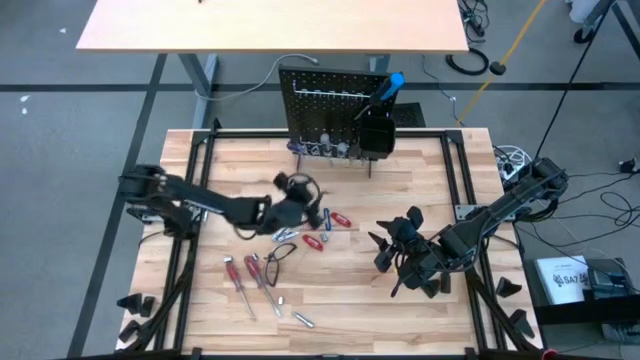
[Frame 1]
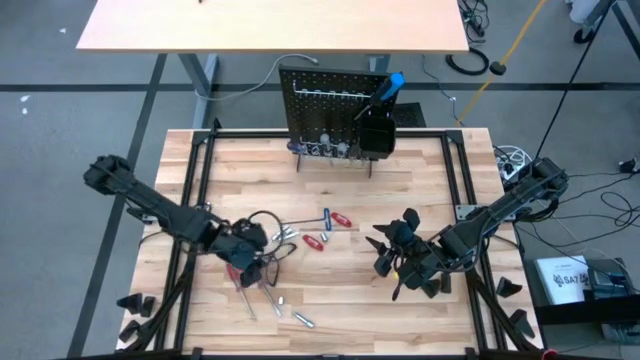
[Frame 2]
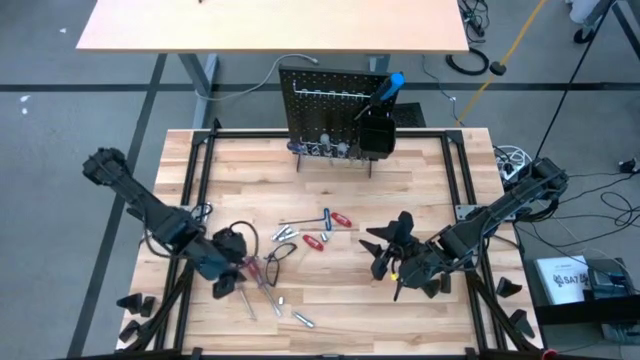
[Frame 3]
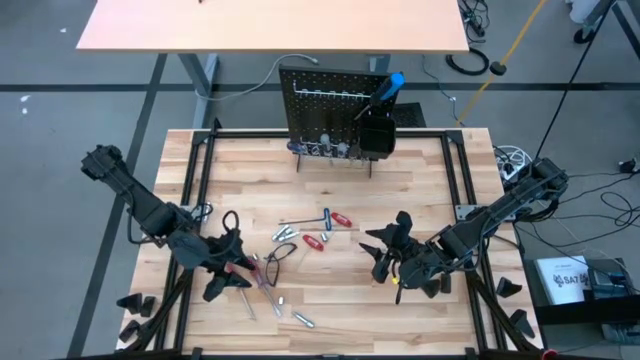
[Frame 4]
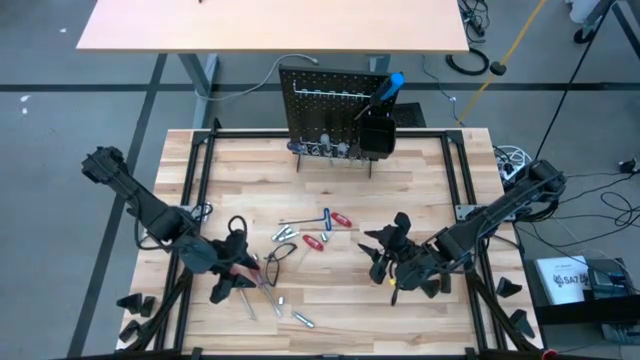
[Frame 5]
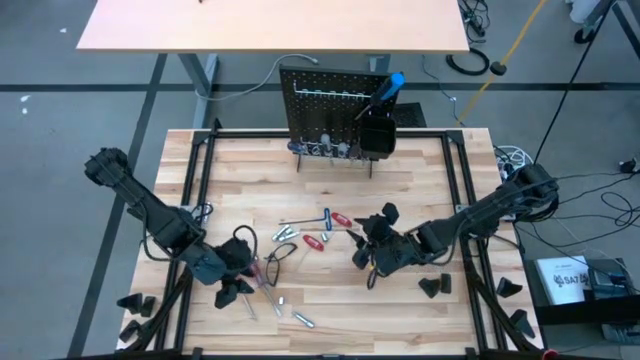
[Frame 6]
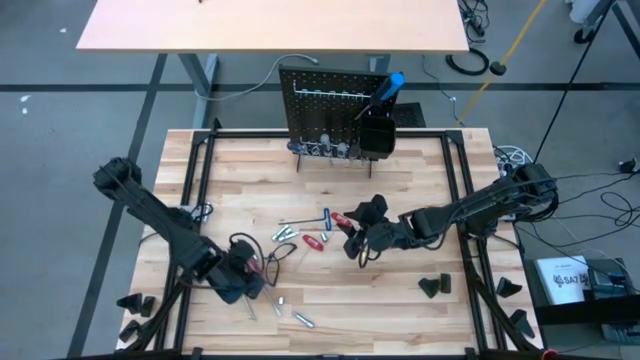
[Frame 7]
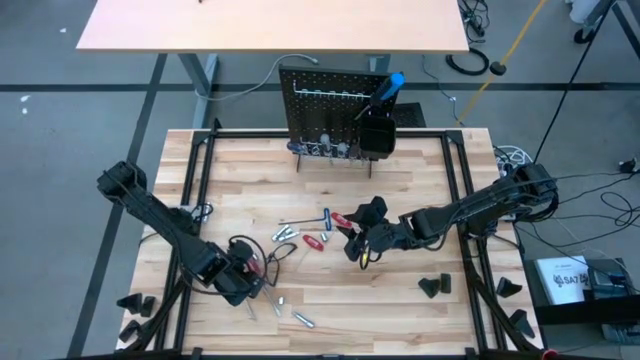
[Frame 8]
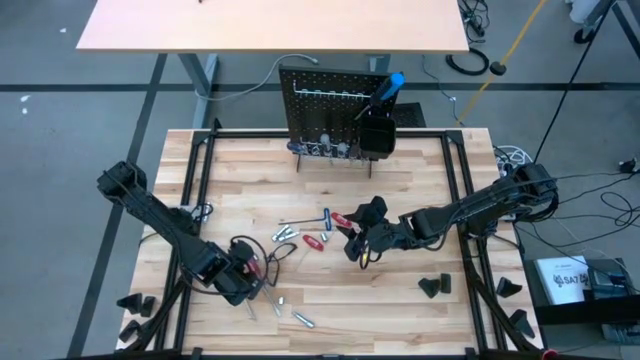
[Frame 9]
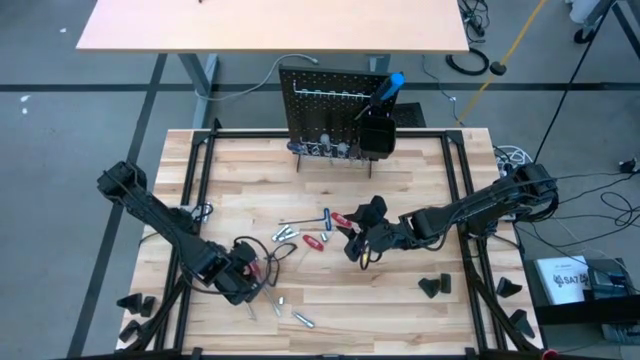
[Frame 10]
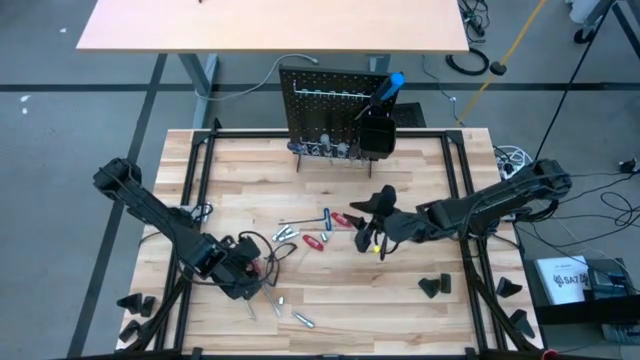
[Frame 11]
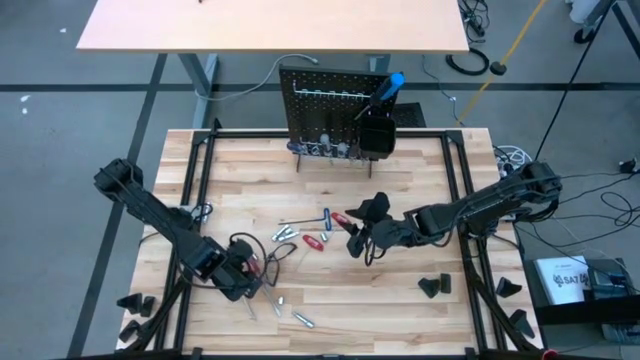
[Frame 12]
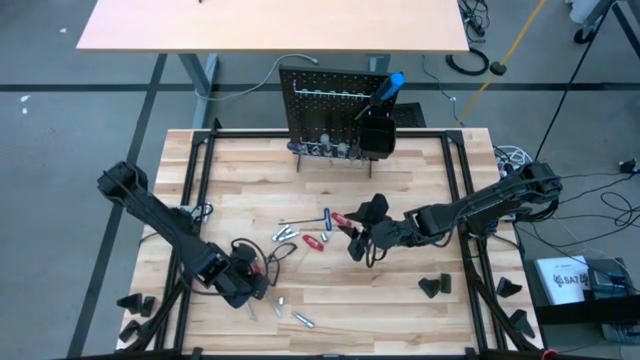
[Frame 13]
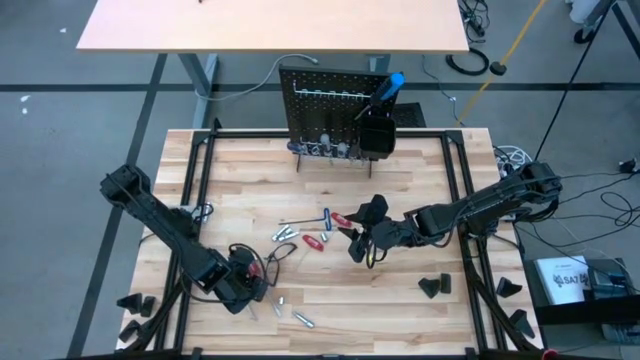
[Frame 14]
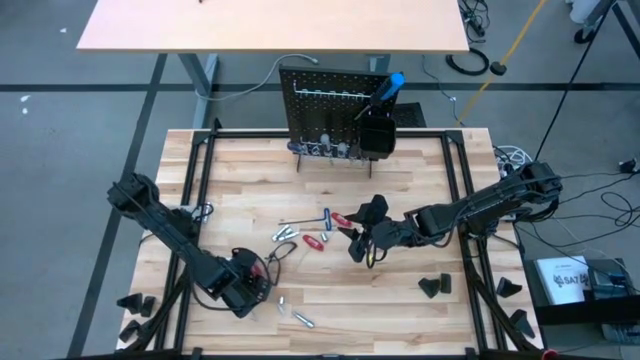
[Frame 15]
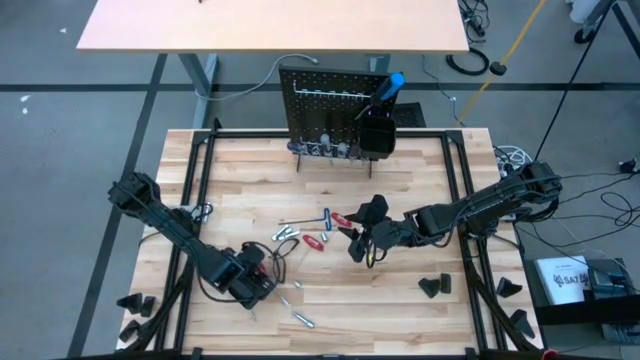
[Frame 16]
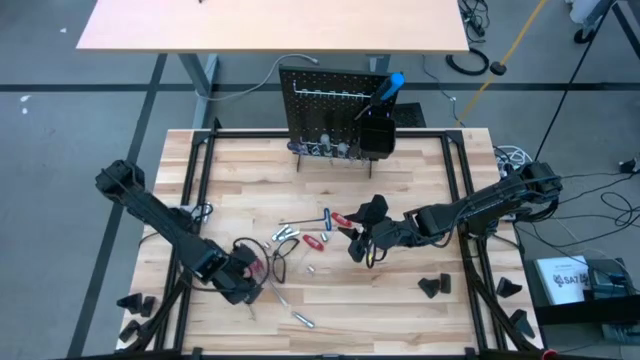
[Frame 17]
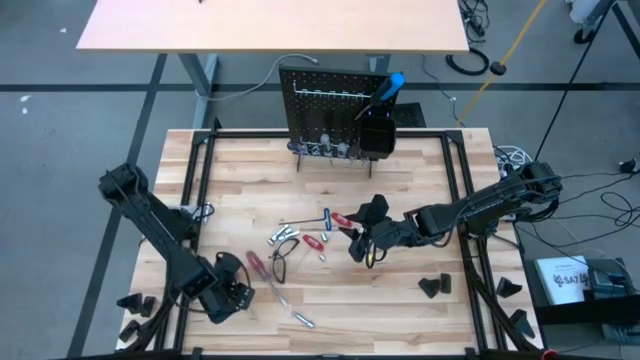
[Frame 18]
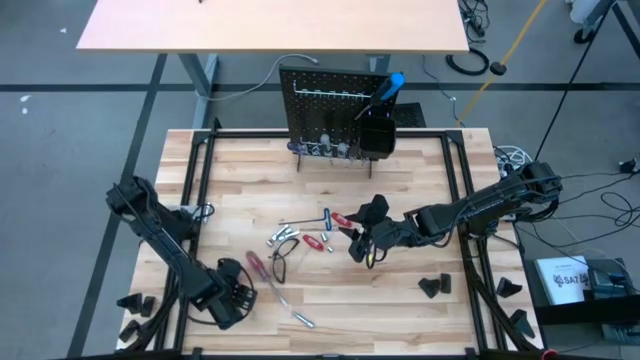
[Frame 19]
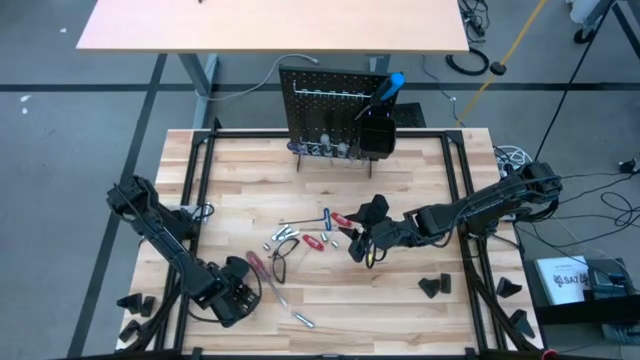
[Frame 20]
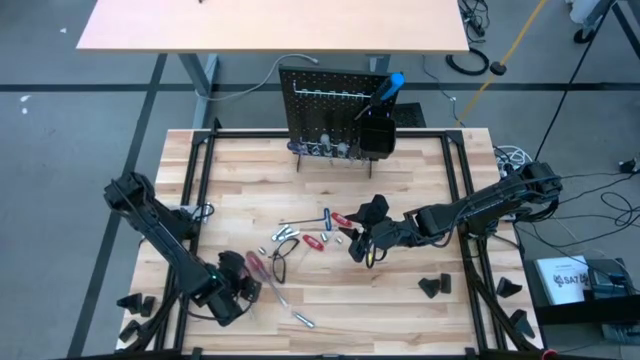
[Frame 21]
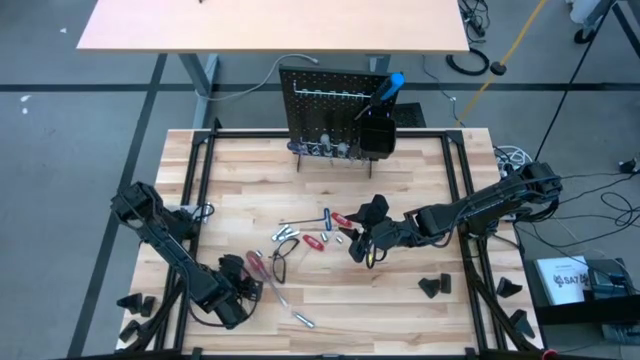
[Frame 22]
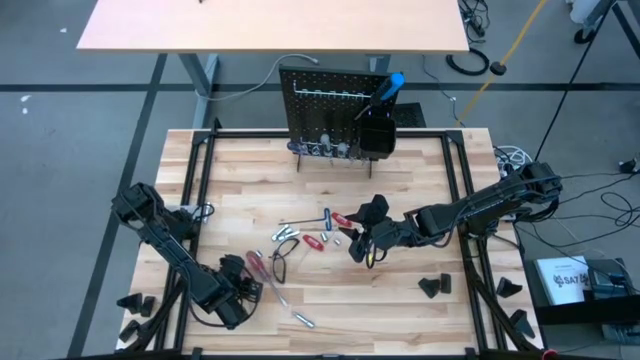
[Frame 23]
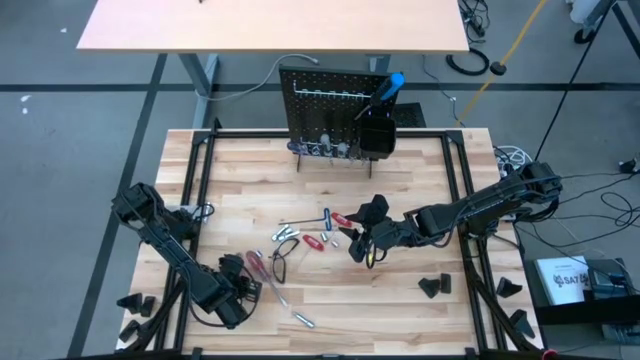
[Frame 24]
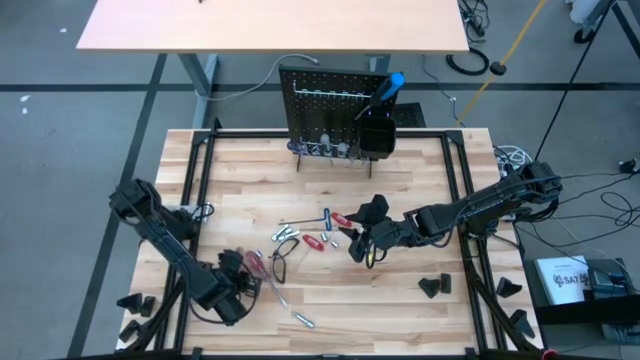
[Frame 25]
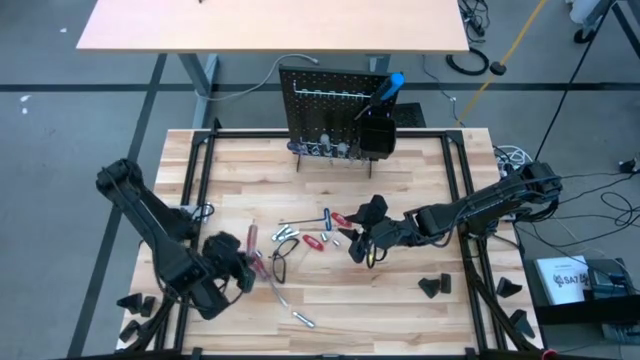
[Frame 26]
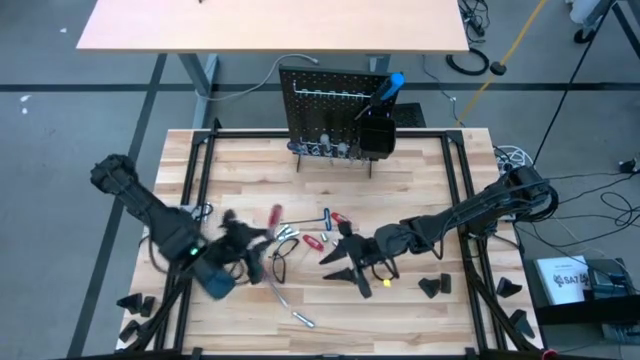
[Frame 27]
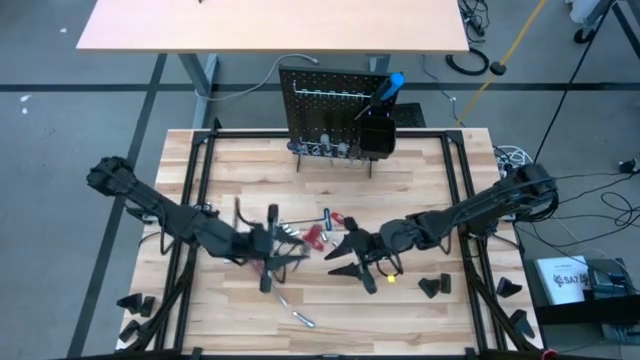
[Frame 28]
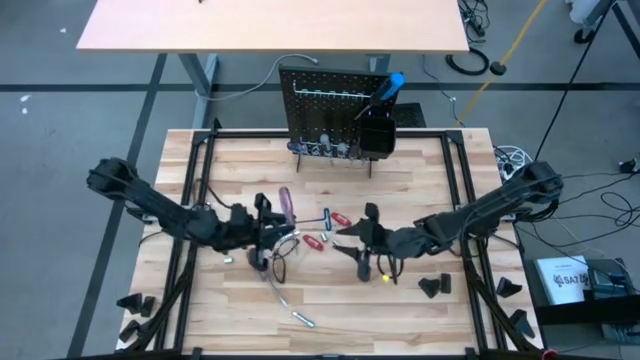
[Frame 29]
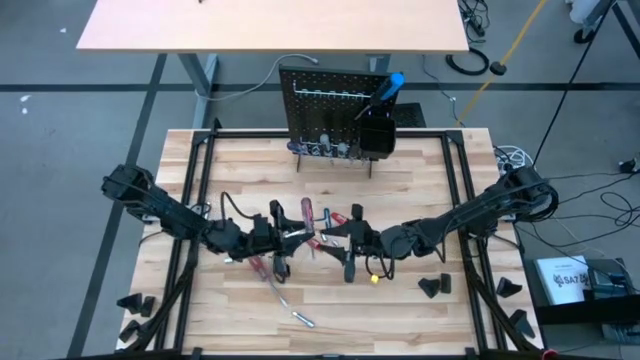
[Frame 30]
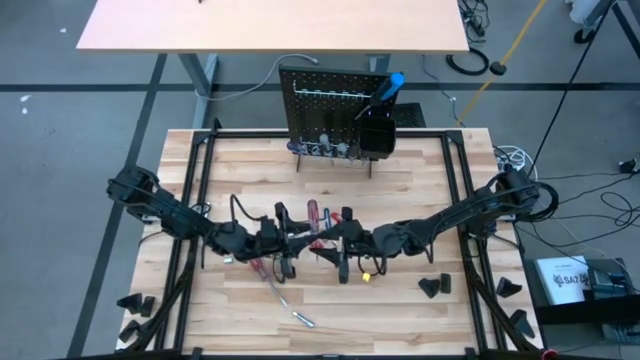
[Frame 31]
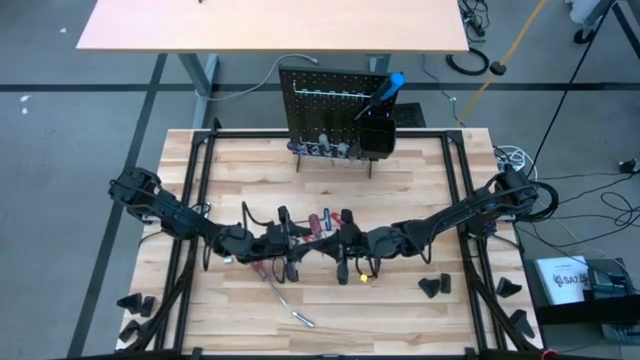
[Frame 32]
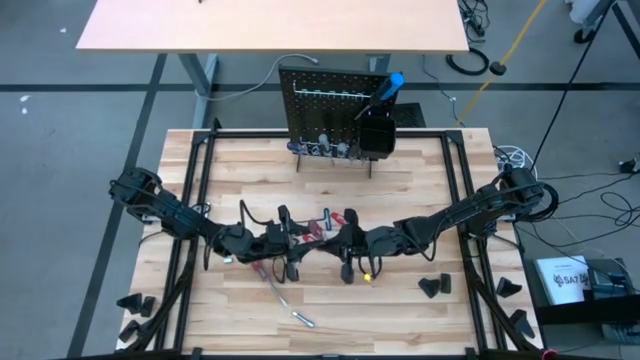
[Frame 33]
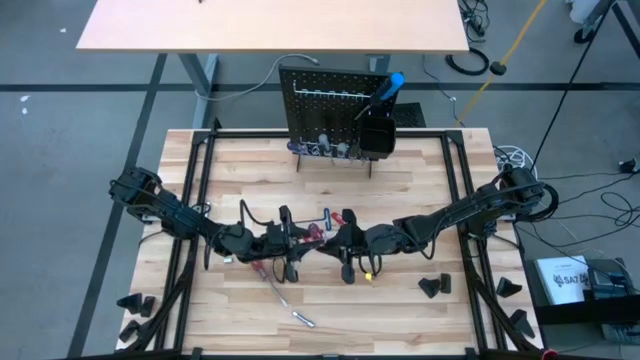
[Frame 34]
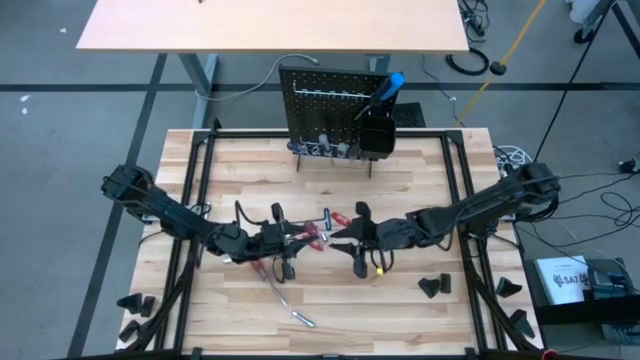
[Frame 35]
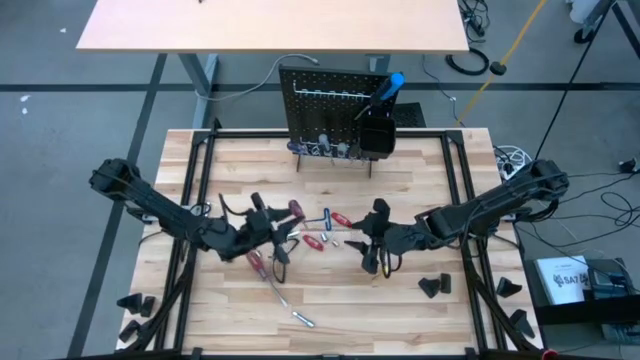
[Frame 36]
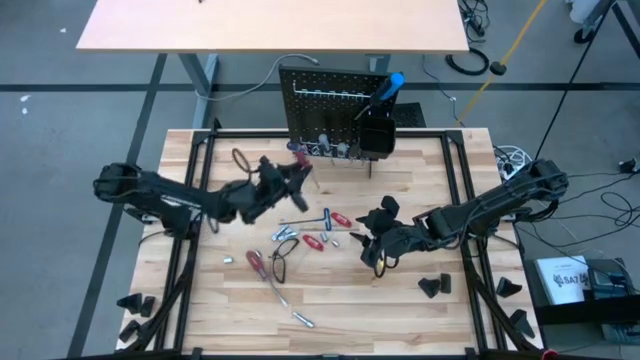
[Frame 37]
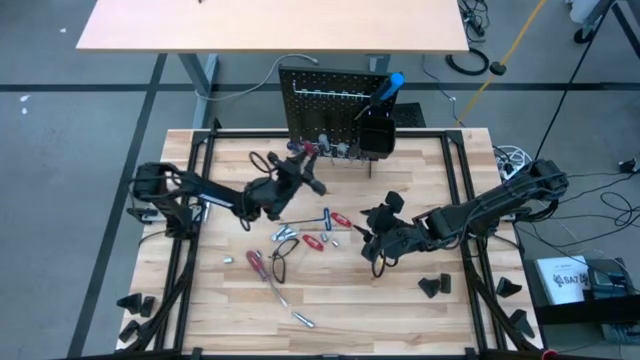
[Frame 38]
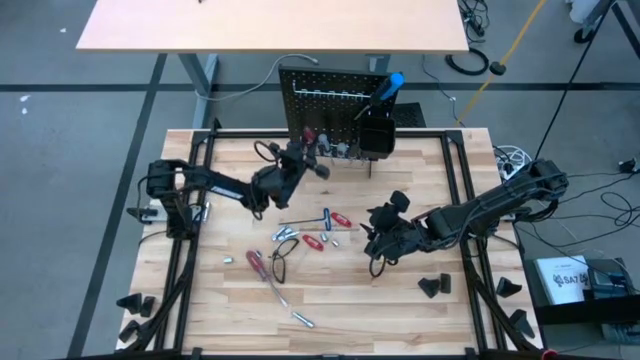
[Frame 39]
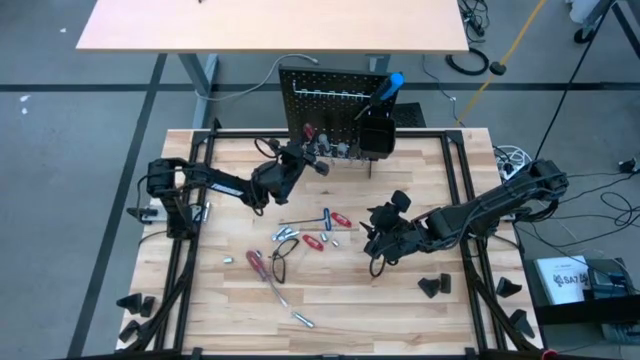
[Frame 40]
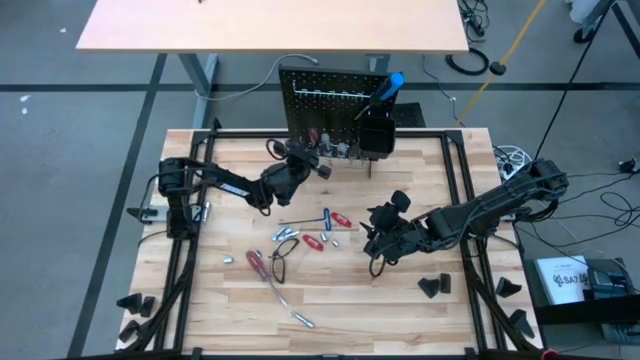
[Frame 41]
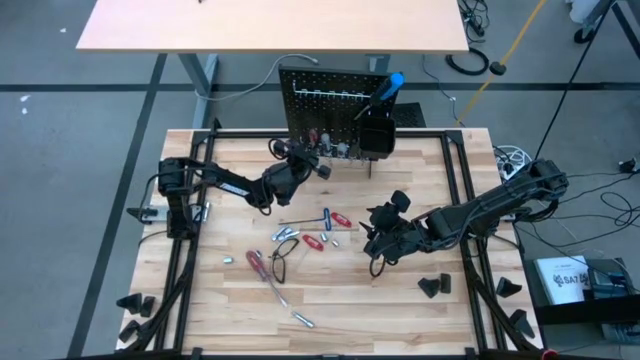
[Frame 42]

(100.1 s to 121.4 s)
Task: Hang tools onto peg board
Hang the red screwdriver onto the peg board
